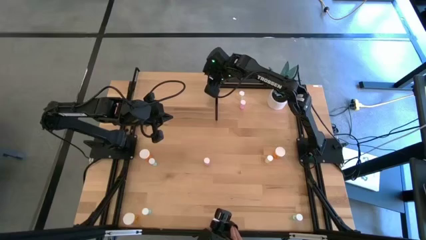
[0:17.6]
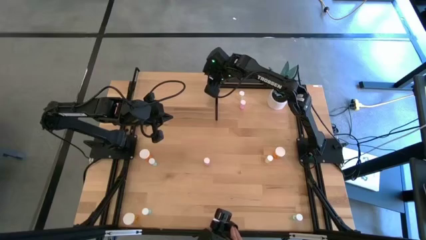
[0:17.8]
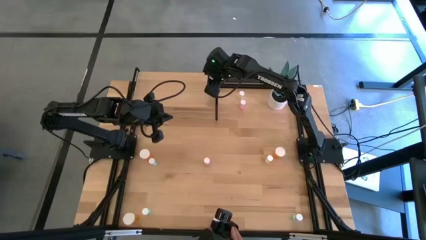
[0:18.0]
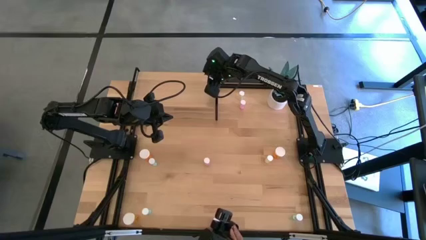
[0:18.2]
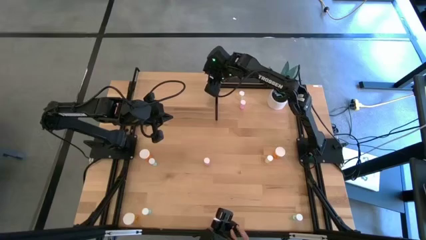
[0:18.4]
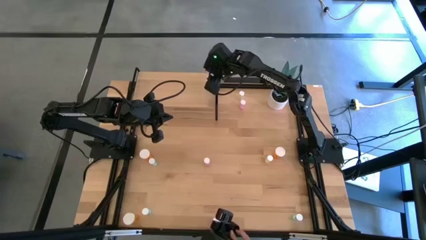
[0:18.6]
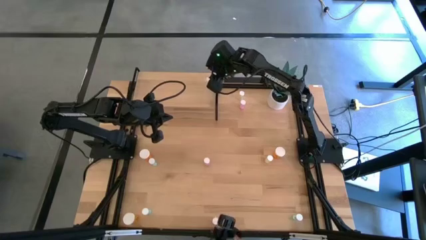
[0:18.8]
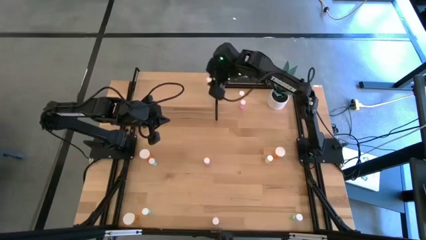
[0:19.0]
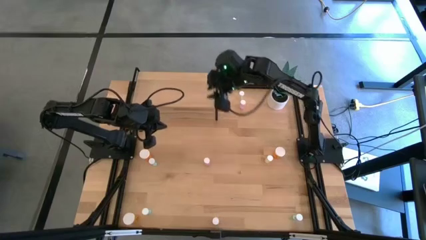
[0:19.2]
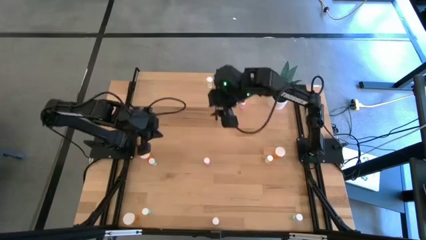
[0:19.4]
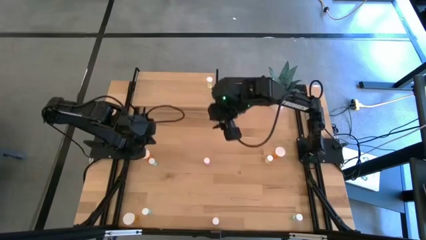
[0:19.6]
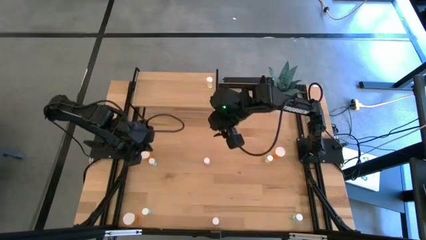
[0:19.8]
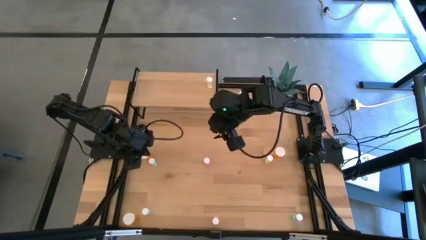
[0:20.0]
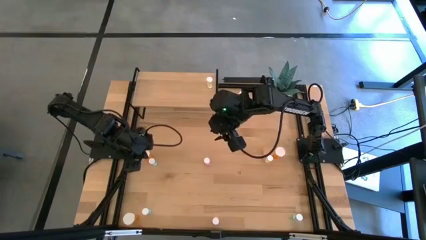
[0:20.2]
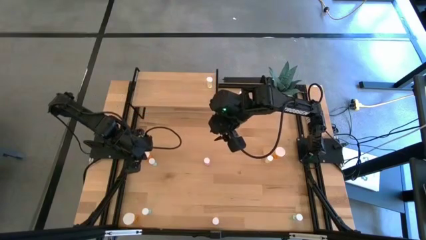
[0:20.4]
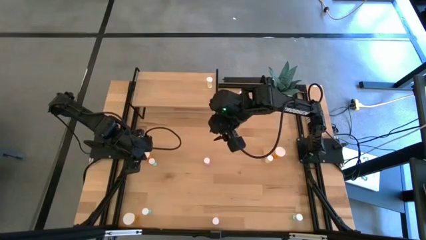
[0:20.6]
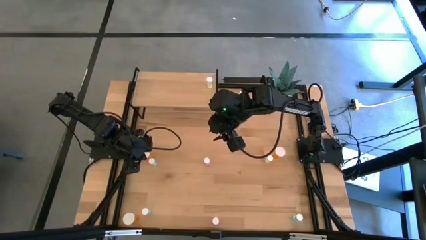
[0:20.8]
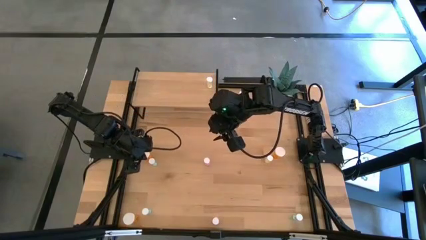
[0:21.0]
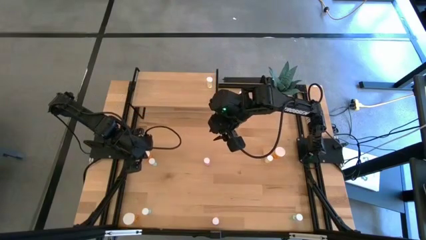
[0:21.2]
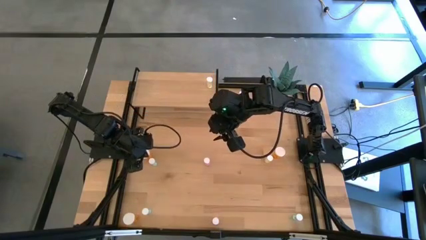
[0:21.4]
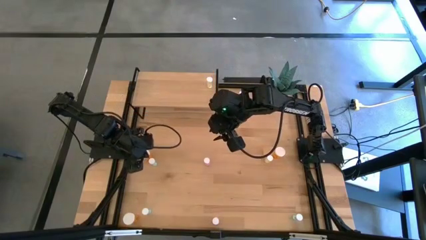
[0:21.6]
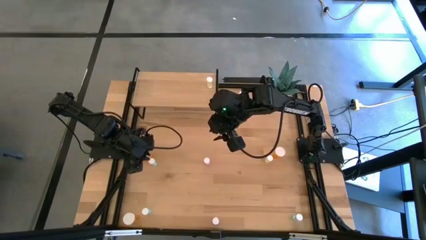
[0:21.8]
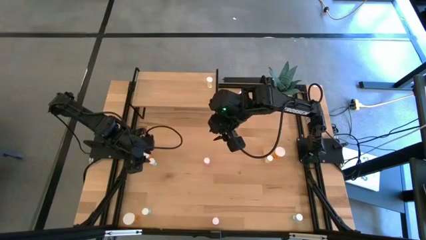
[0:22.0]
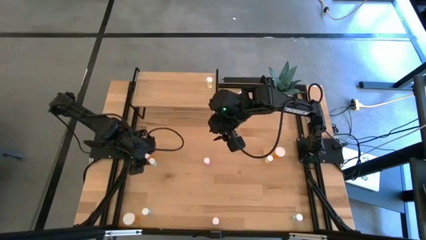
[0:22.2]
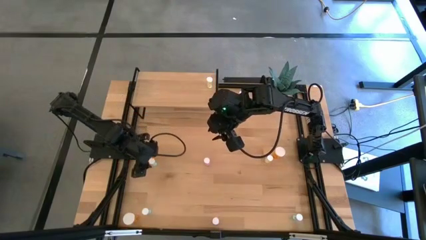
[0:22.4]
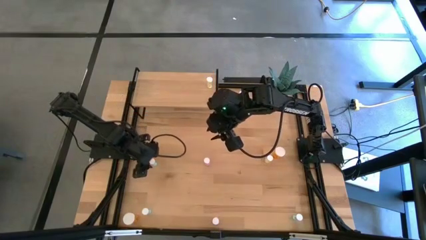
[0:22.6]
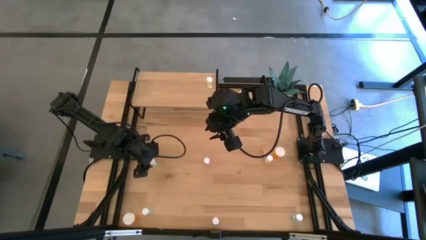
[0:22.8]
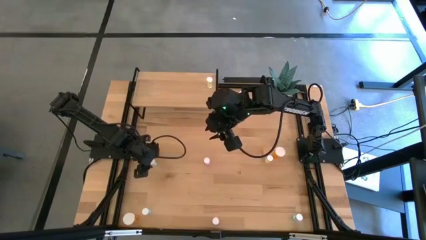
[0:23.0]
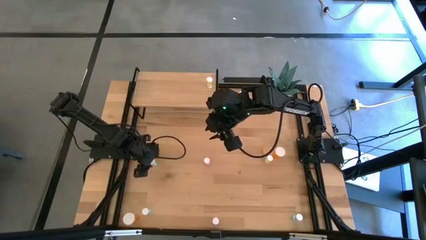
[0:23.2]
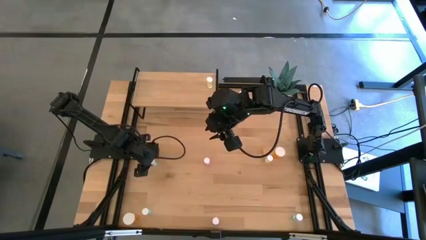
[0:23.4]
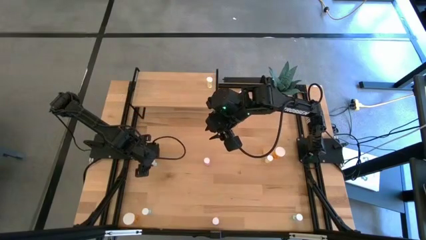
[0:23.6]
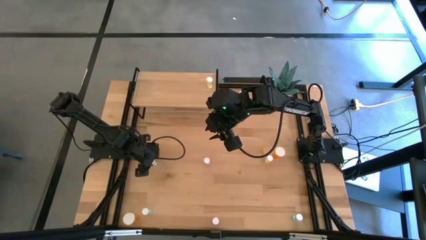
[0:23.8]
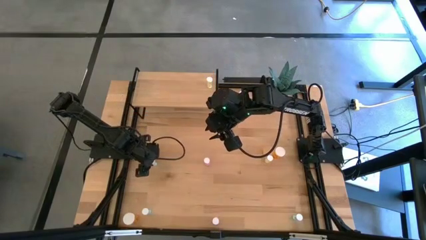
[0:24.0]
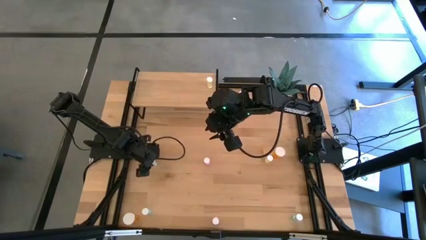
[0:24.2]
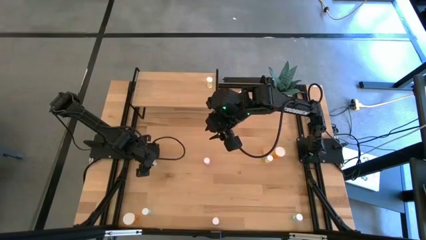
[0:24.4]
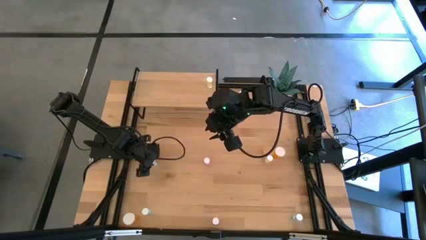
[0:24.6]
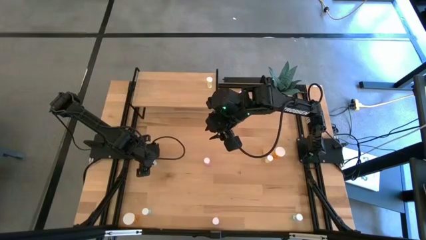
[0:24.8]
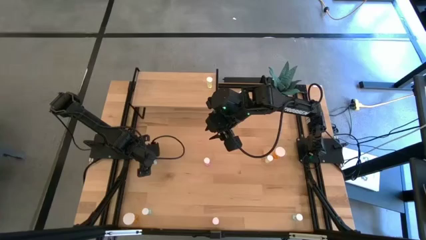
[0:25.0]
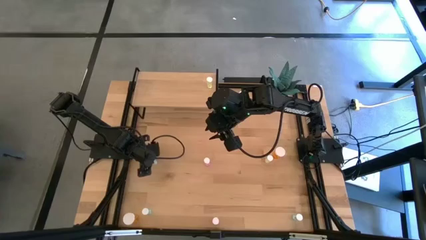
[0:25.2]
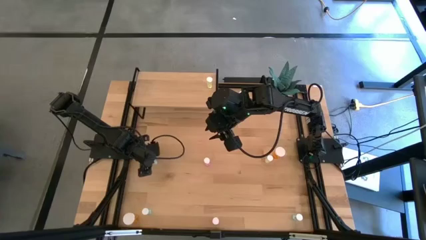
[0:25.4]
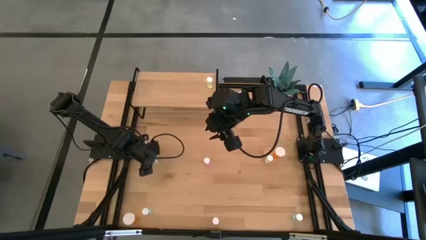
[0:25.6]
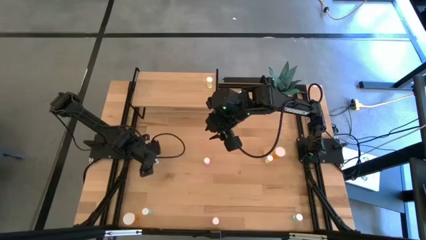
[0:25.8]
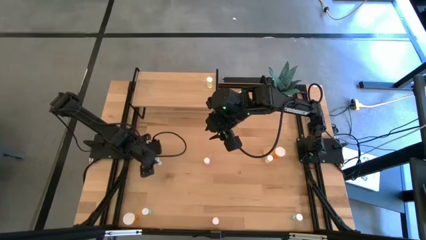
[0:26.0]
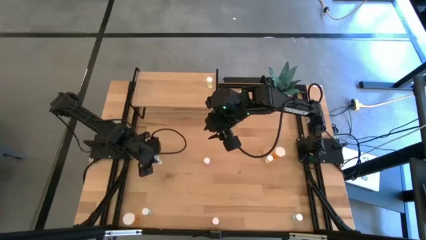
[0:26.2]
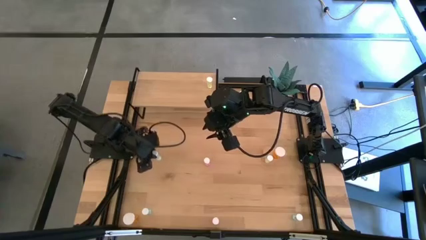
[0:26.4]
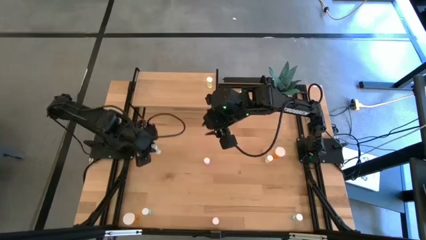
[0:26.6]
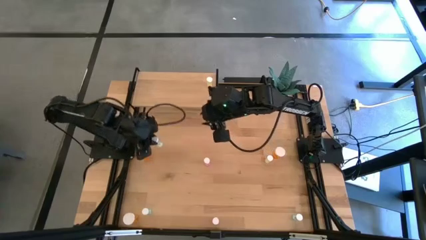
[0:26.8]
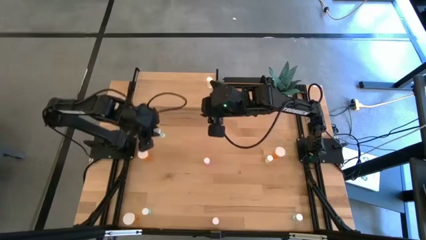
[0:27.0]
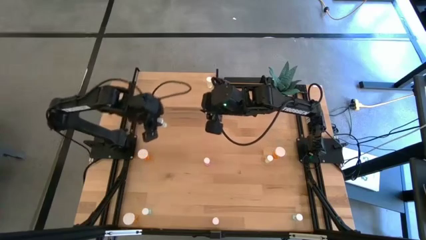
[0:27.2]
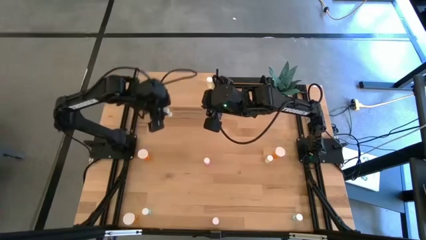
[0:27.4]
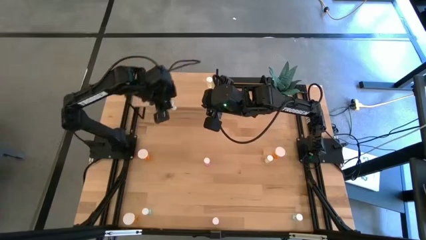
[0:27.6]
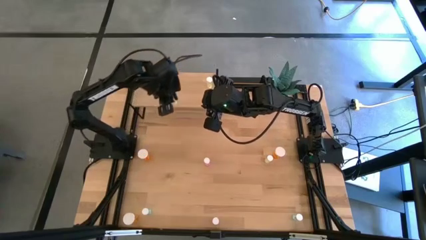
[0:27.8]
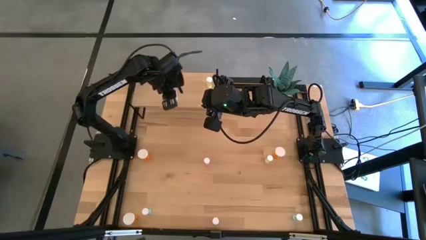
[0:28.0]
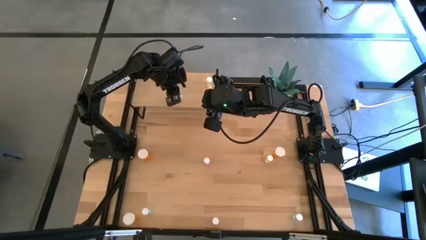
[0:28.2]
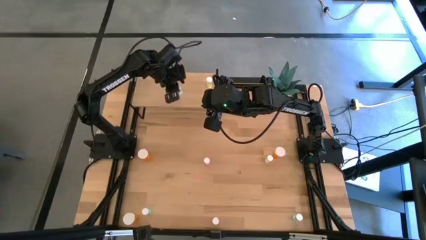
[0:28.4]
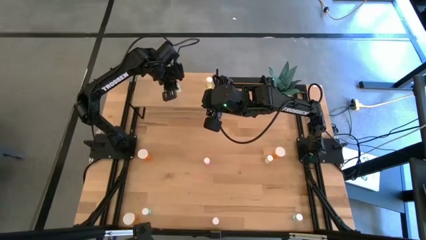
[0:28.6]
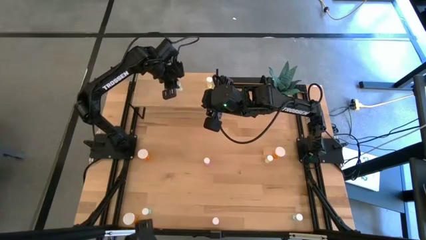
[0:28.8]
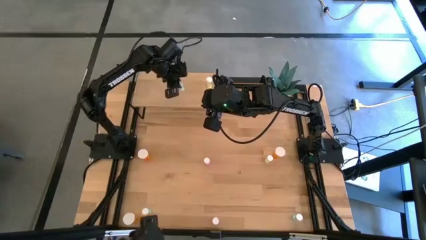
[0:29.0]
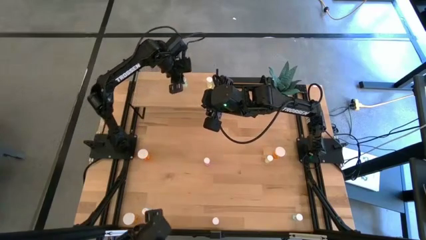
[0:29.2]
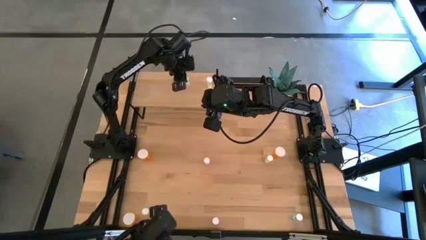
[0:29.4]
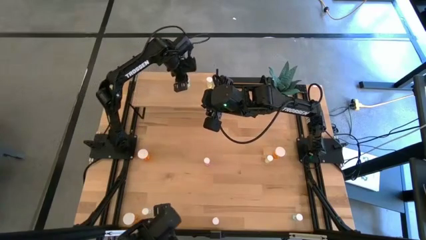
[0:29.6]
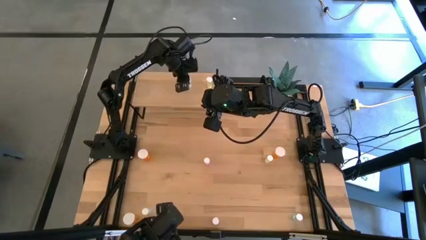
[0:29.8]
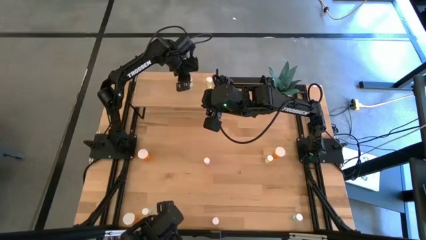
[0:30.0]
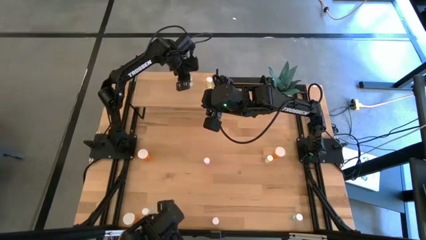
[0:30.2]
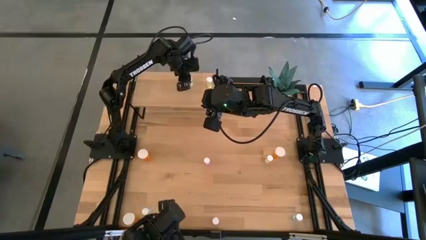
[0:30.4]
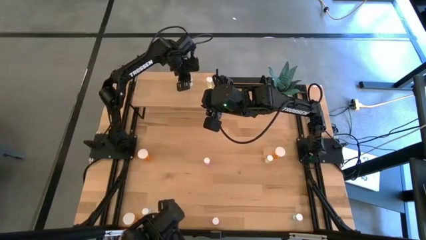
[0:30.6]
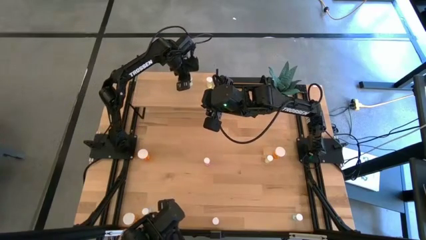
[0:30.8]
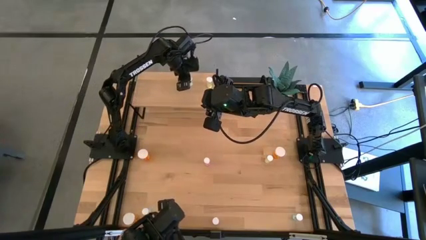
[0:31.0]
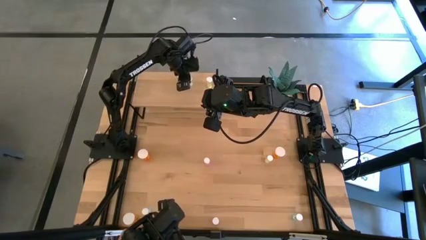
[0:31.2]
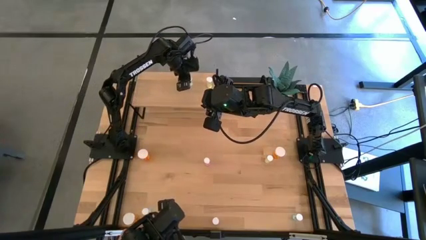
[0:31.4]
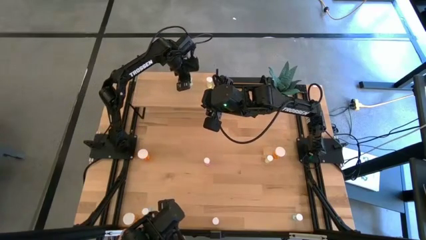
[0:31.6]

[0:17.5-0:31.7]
Task: Pick and place medicine bottles onto shelf by color
Put the top blue pill bottle on the shelf
